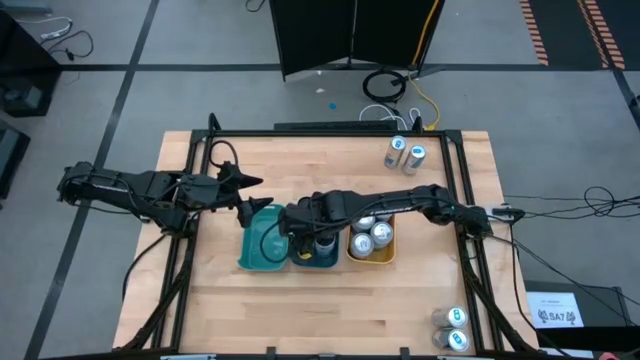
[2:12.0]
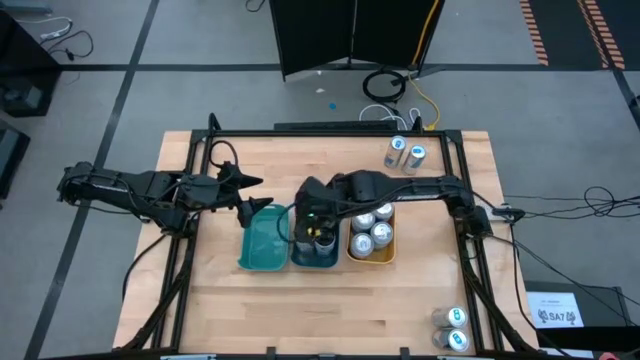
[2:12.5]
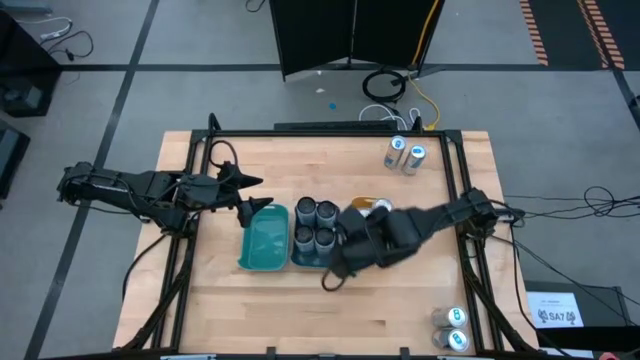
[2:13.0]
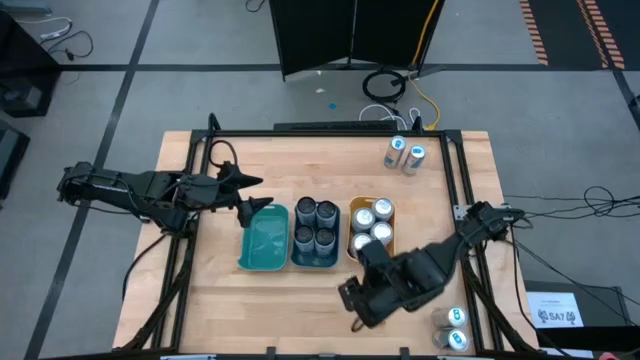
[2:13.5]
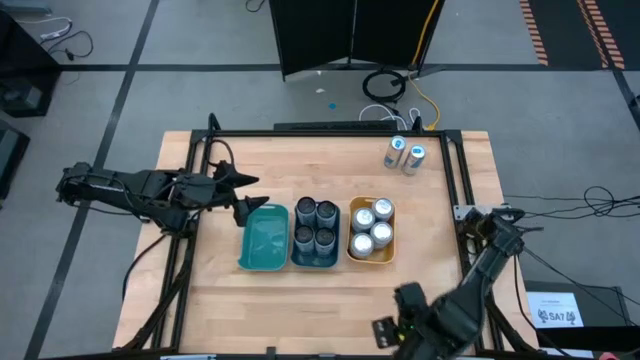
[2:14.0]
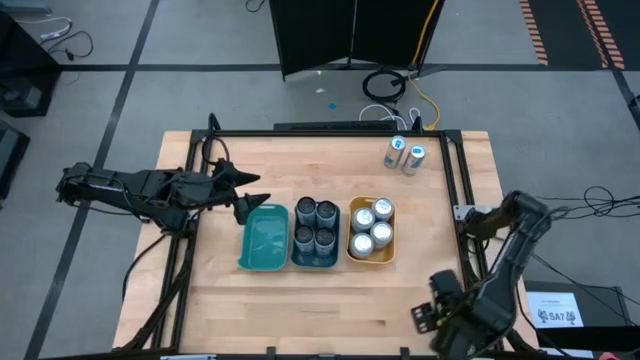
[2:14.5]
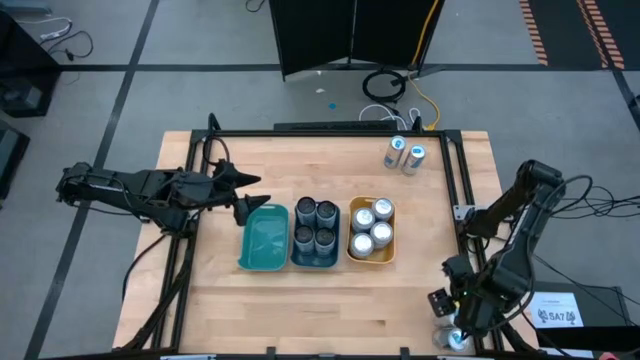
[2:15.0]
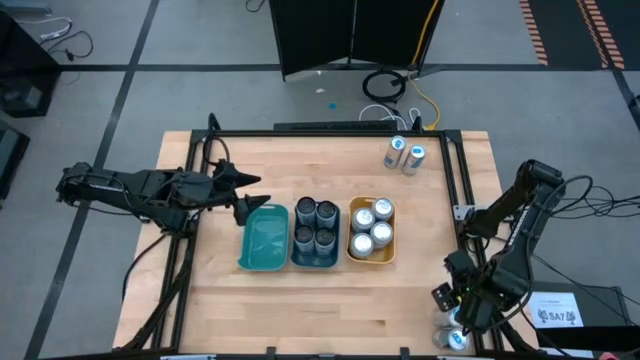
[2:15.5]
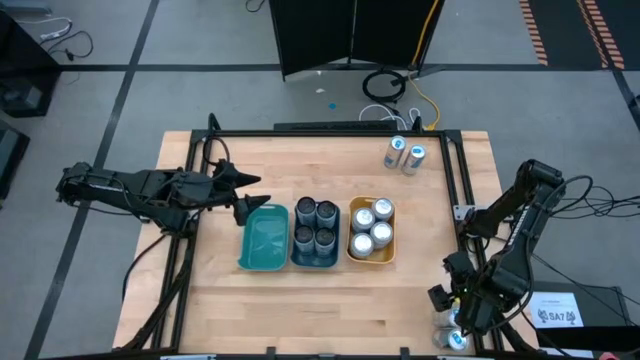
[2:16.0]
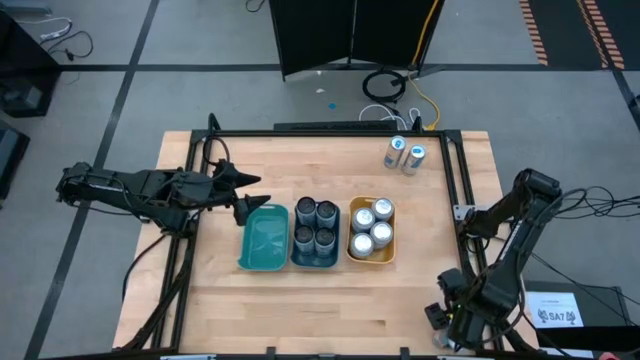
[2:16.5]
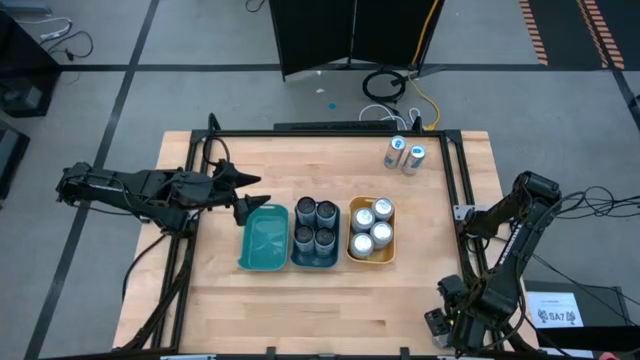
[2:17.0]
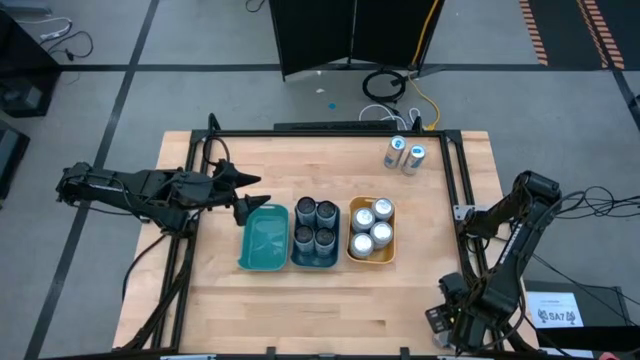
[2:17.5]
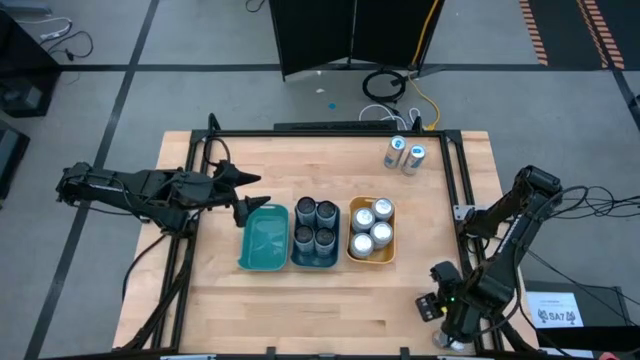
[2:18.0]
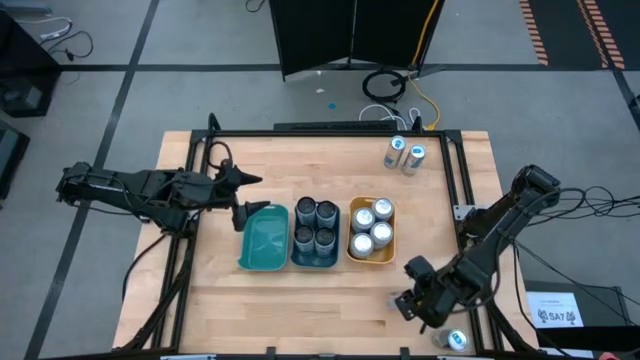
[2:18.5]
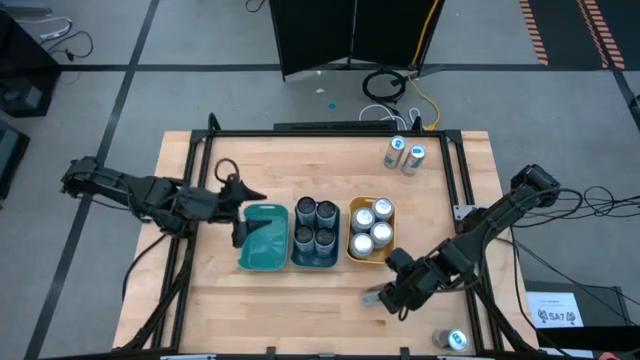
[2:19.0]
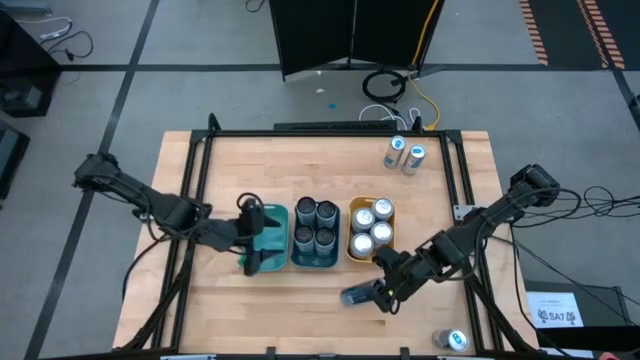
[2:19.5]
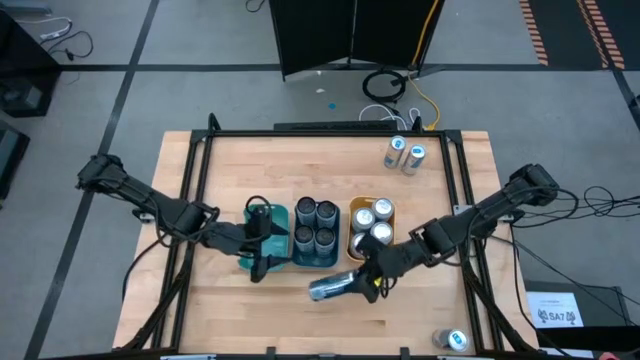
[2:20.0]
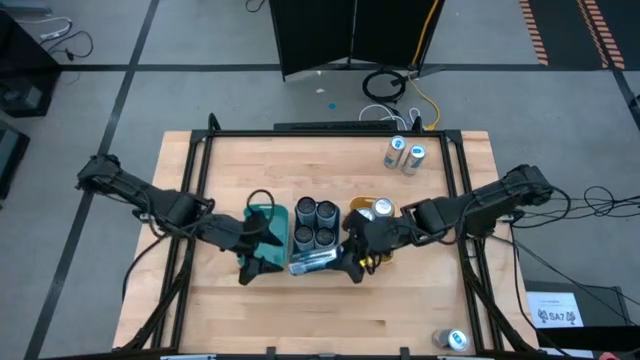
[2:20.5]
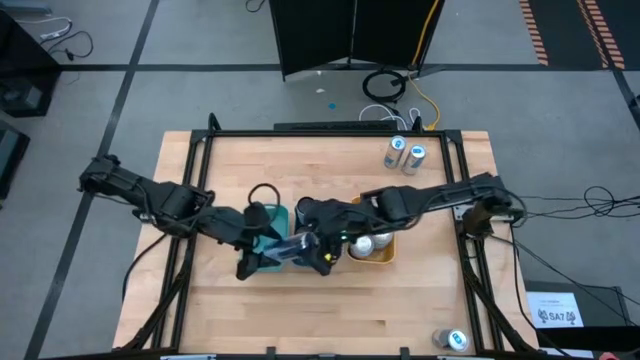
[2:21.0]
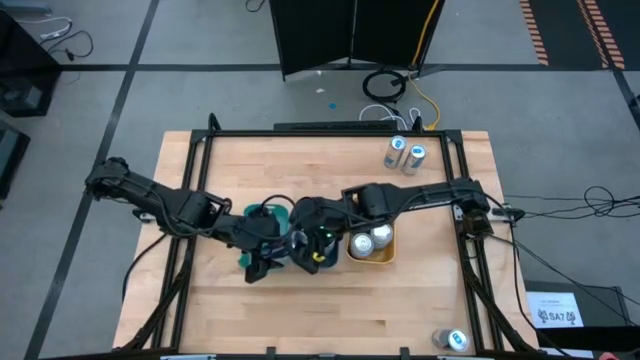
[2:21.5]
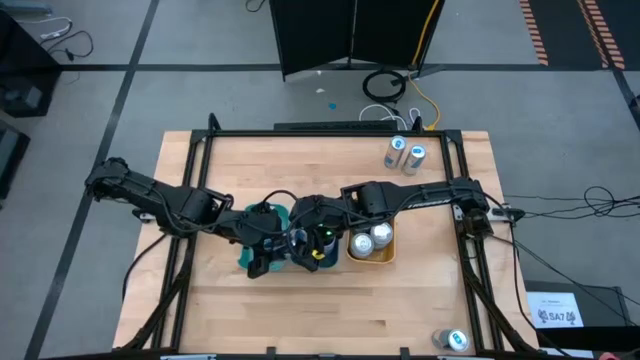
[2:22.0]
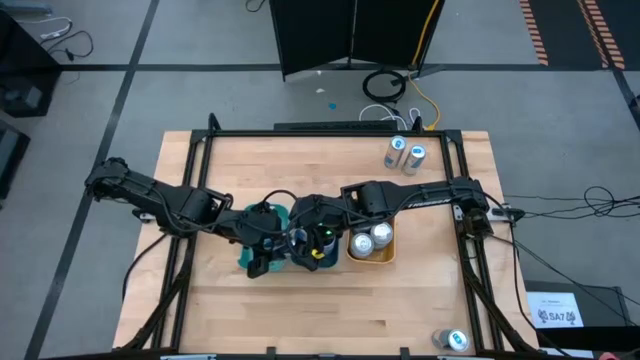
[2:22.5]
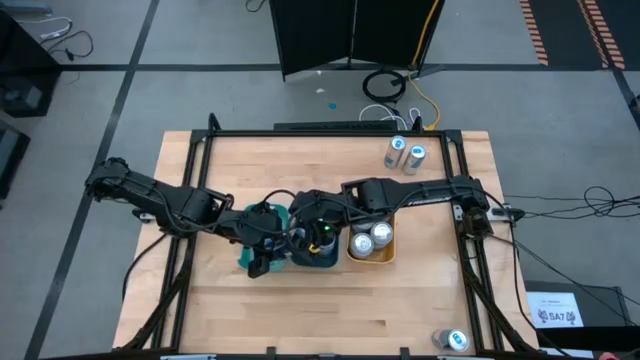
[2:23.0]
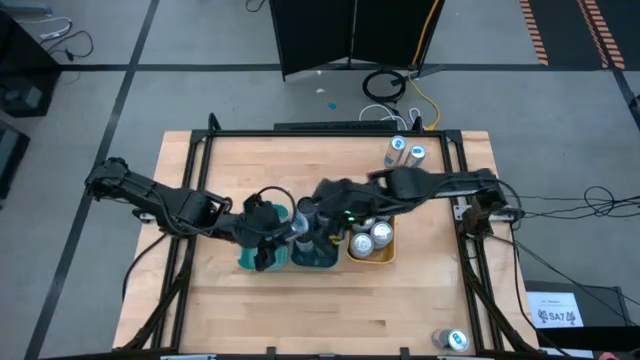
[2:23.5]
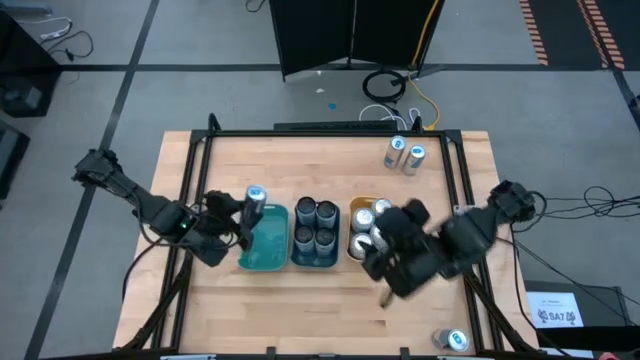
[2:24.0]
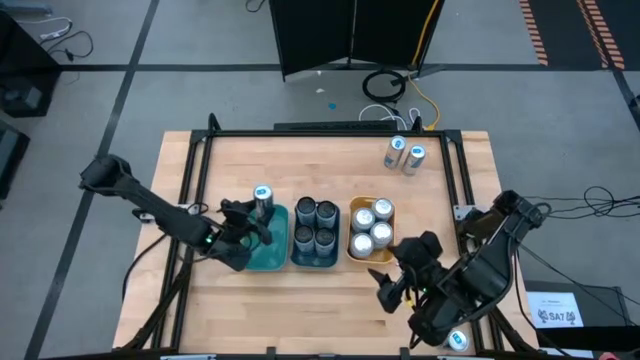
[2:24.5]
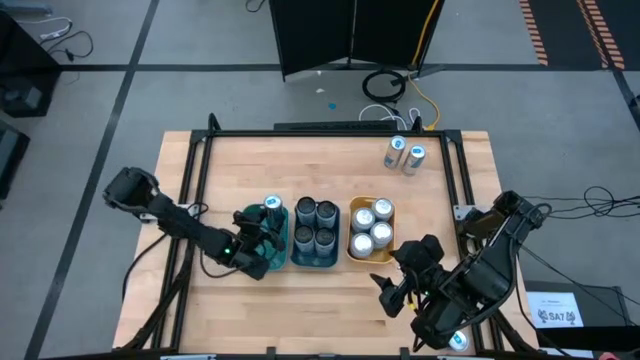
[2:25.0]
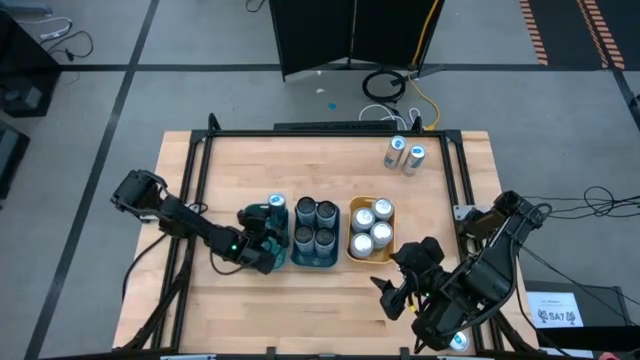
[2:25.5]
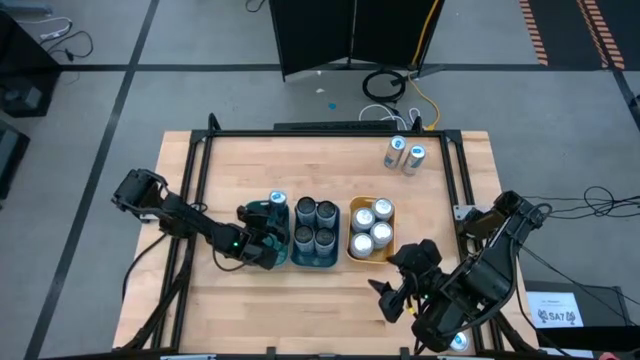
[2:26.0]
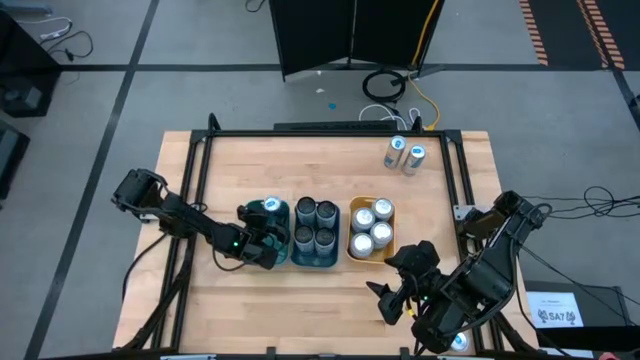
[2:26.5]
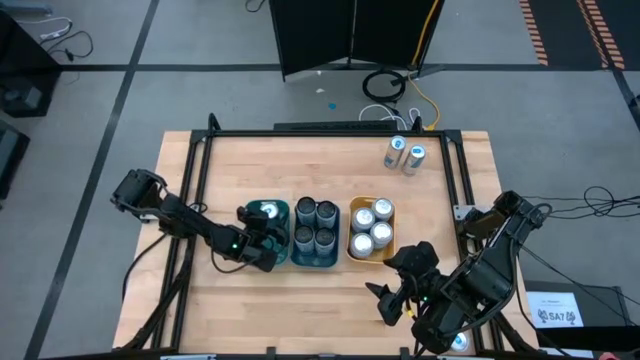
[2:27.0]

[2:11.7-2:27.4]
Task: Sort soda cans
Put the center blue soda can can into the green bin

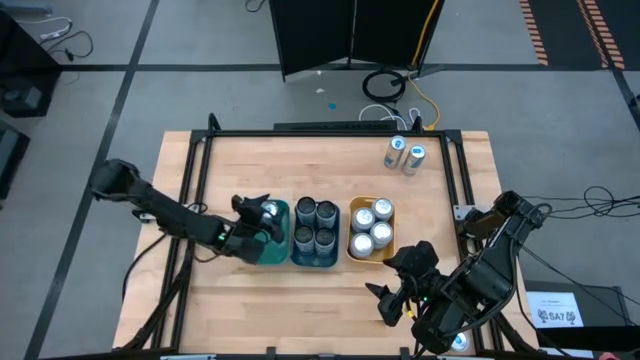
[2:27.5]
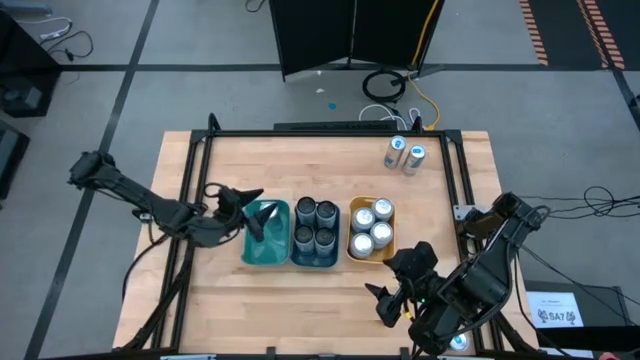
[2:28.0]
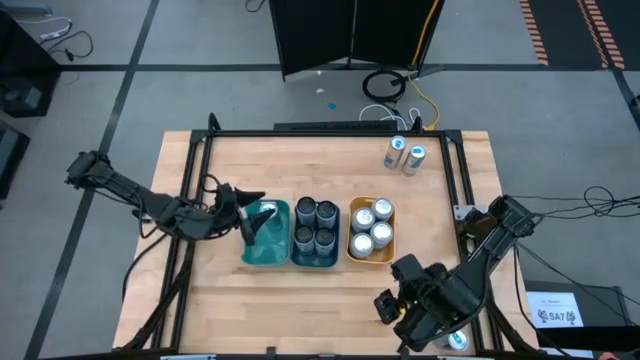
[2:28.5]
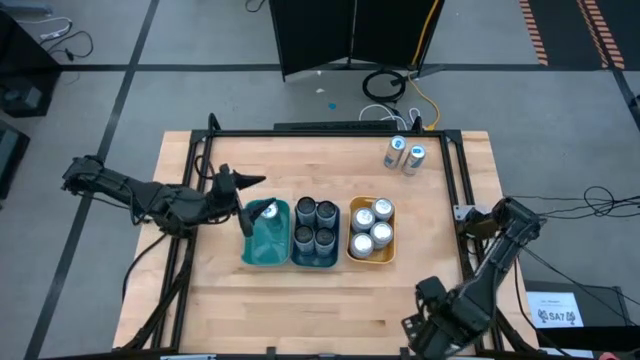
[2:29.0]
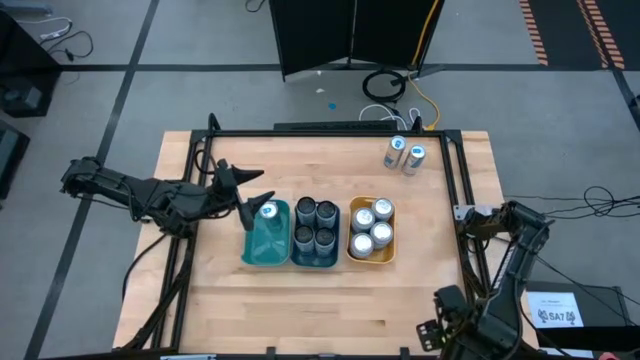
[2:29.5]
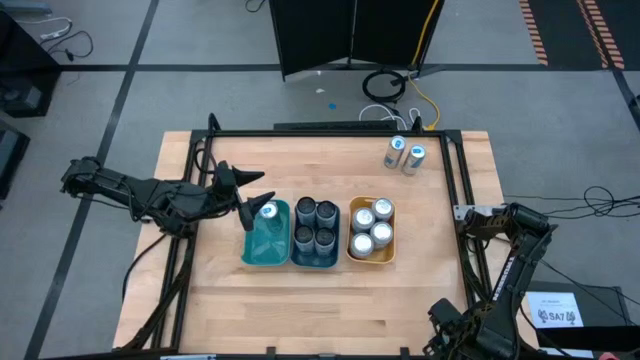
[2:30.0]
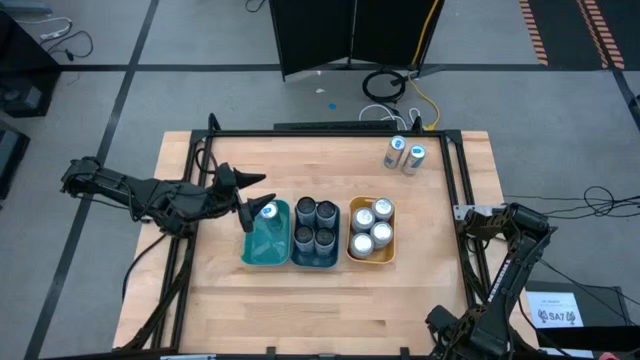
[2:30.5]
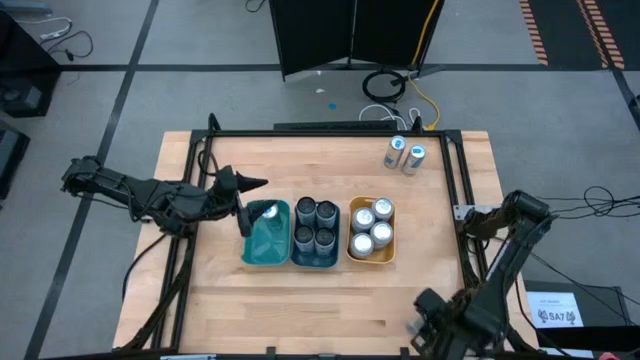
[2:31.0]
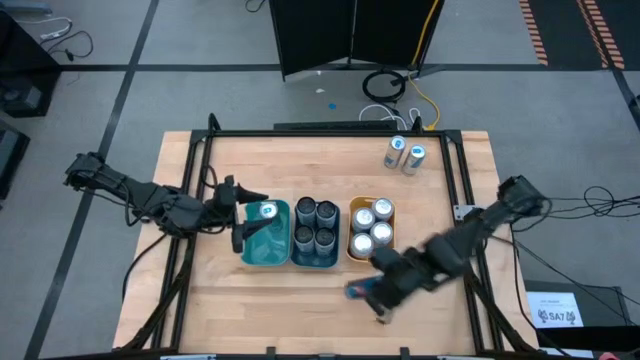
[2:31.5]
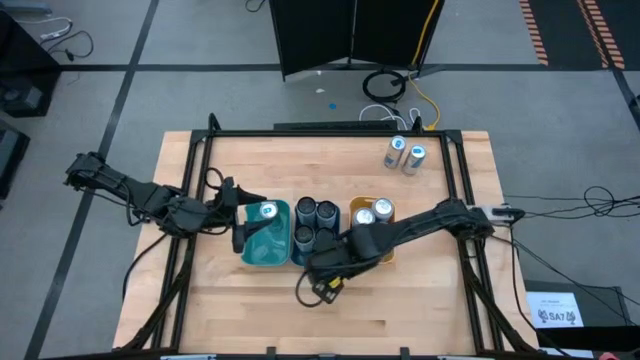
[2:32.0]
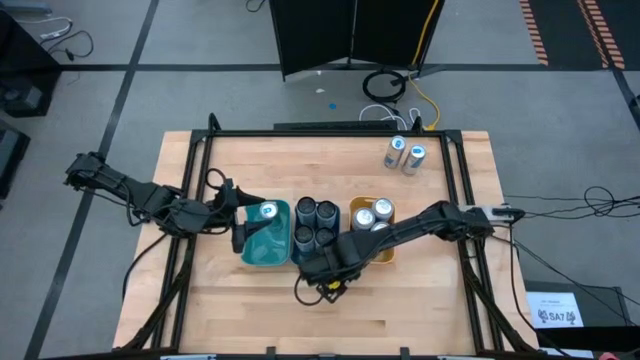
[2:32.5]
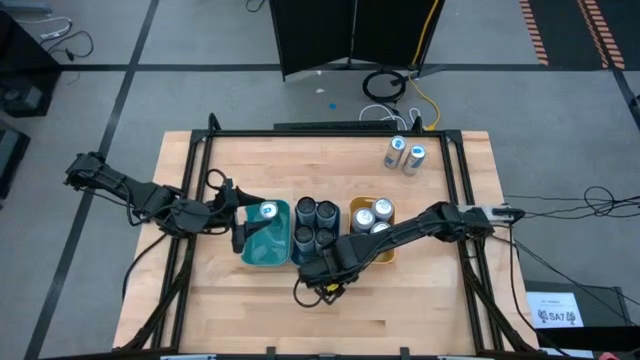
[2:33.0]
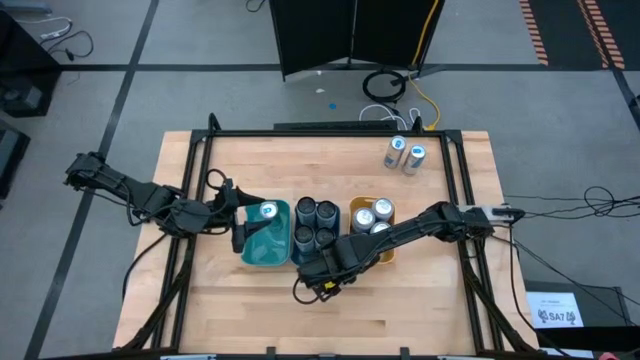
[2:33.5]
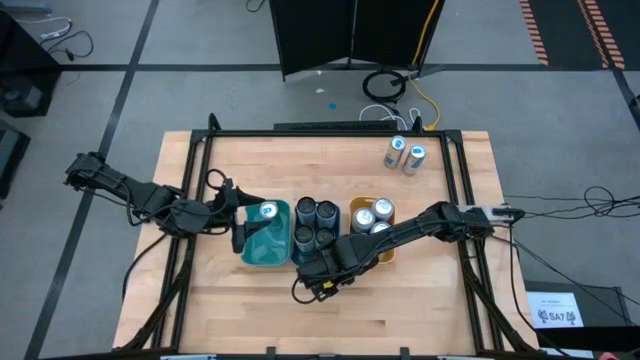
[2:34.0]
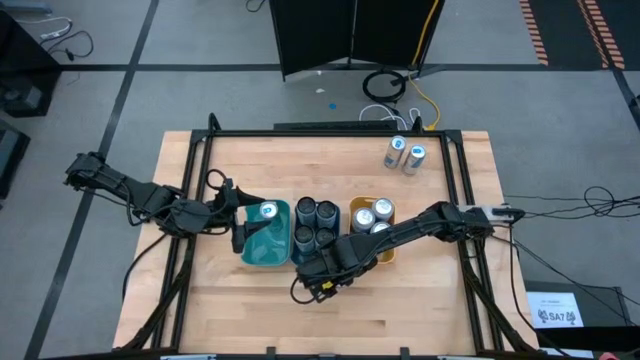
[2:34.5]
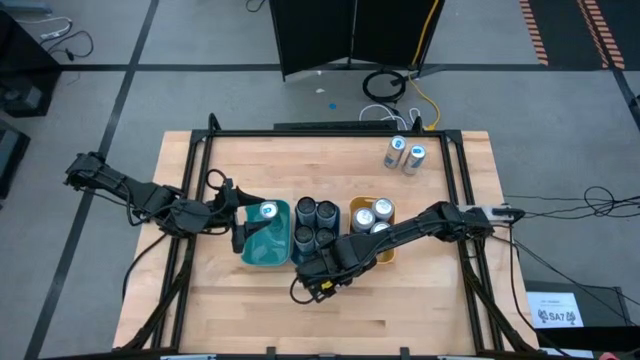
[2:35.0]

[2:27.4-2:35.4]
Move the bottom blue soda can to the center of the table
